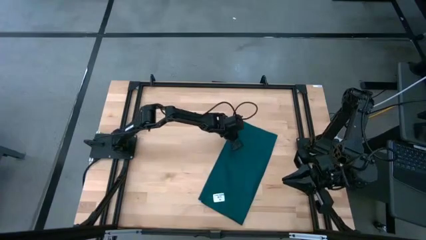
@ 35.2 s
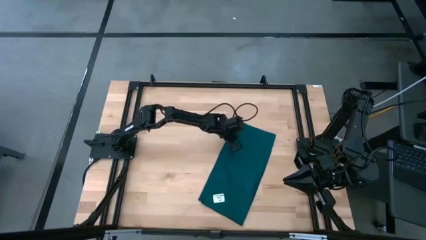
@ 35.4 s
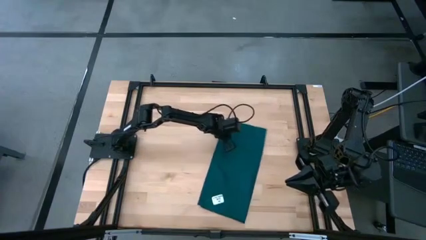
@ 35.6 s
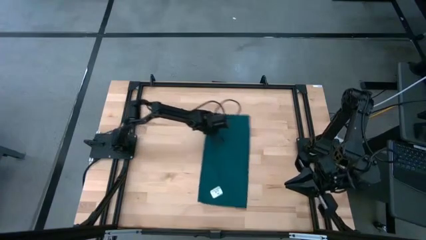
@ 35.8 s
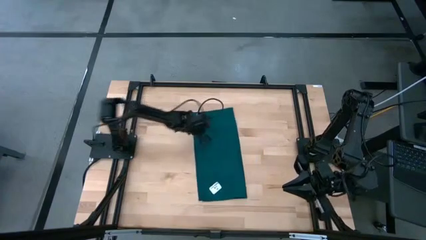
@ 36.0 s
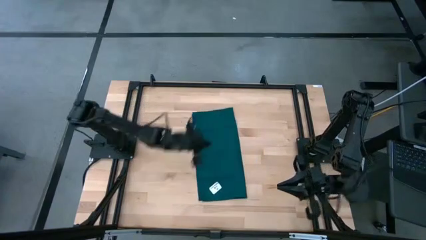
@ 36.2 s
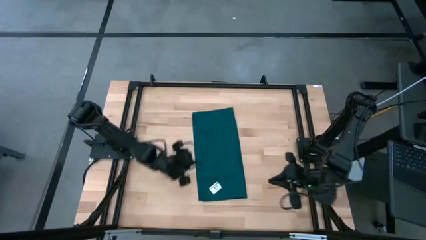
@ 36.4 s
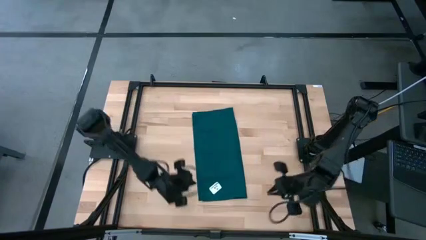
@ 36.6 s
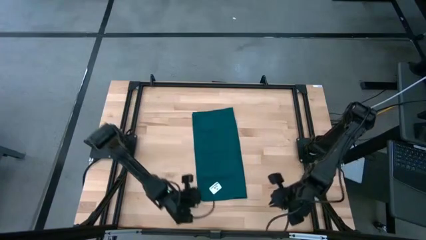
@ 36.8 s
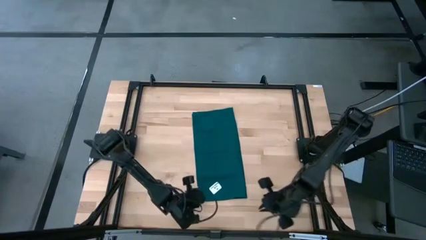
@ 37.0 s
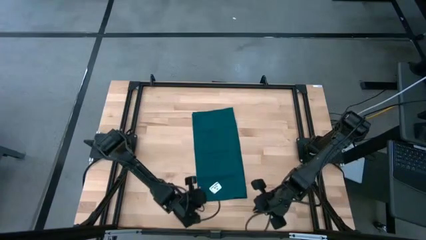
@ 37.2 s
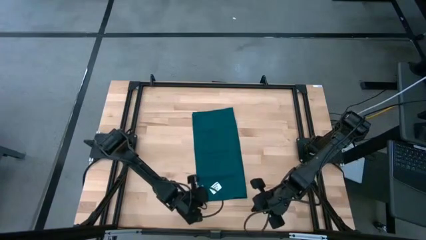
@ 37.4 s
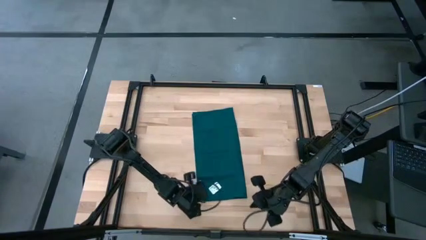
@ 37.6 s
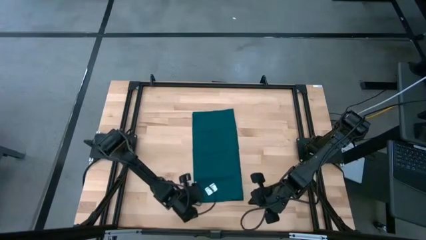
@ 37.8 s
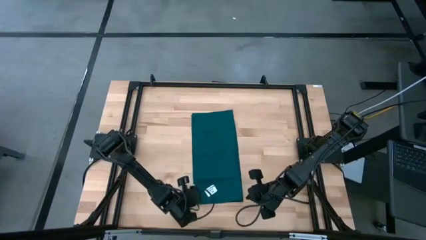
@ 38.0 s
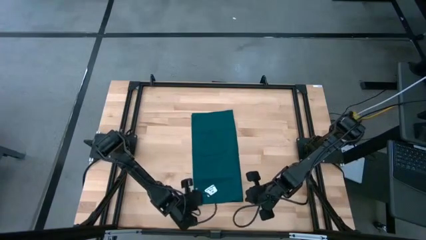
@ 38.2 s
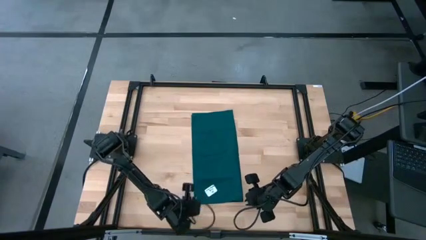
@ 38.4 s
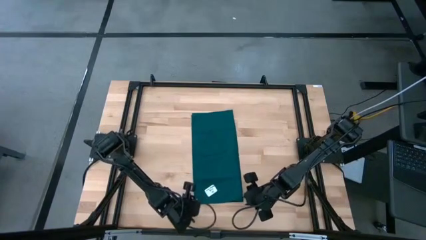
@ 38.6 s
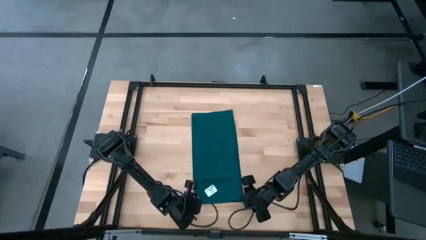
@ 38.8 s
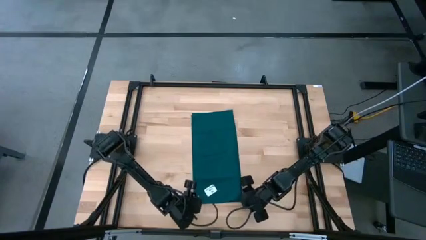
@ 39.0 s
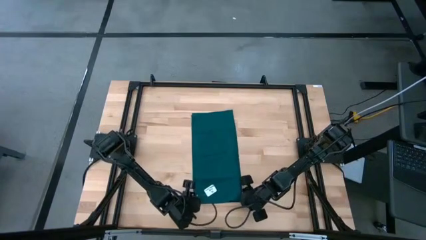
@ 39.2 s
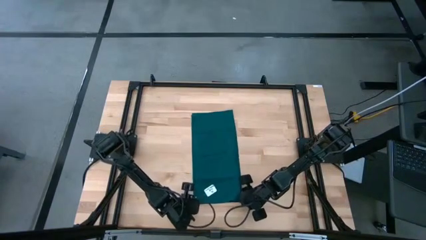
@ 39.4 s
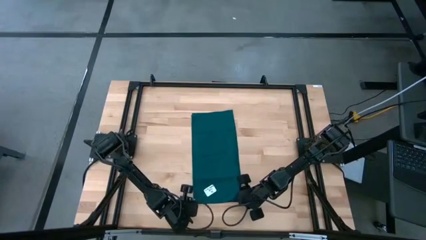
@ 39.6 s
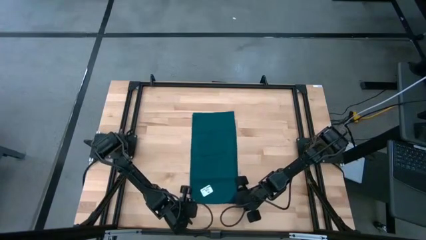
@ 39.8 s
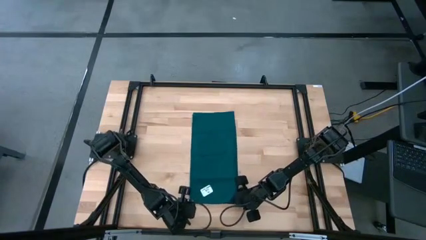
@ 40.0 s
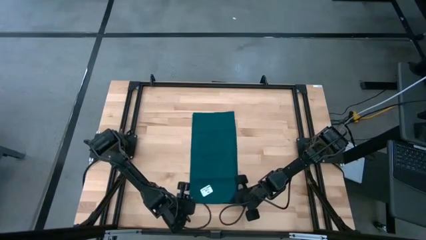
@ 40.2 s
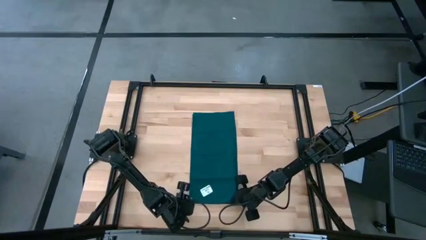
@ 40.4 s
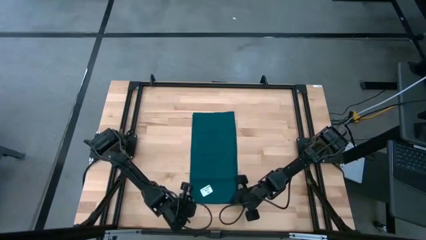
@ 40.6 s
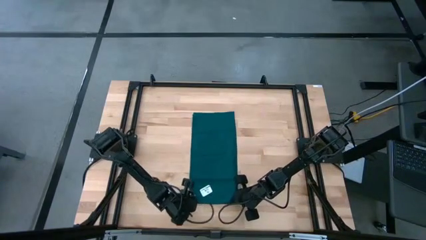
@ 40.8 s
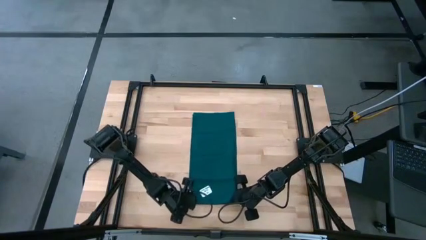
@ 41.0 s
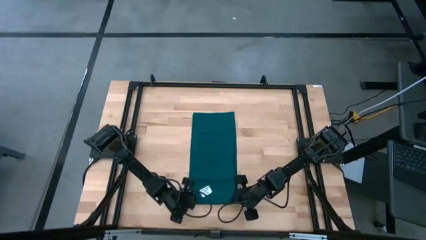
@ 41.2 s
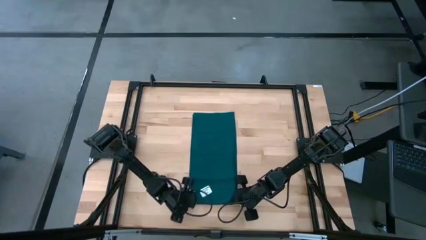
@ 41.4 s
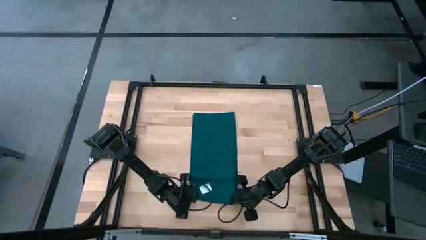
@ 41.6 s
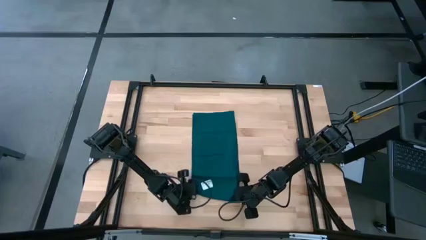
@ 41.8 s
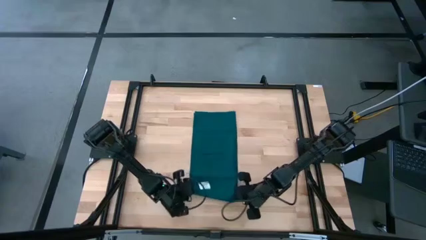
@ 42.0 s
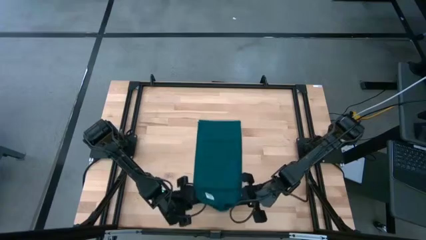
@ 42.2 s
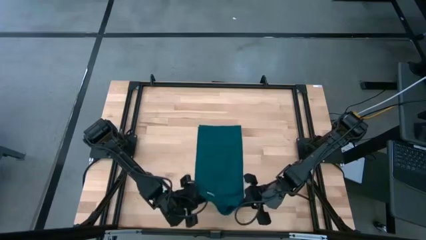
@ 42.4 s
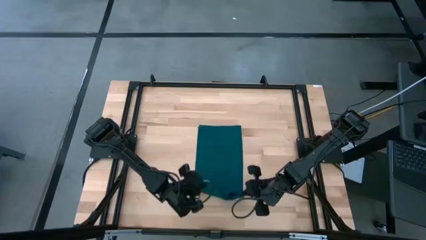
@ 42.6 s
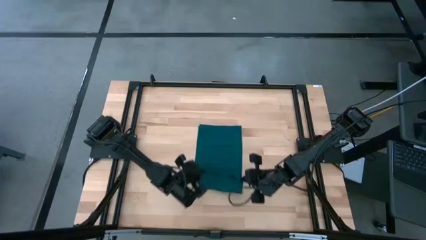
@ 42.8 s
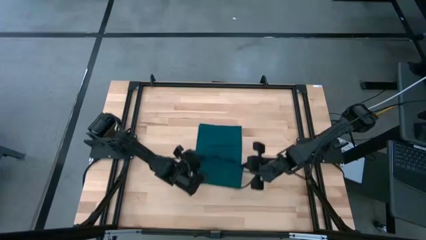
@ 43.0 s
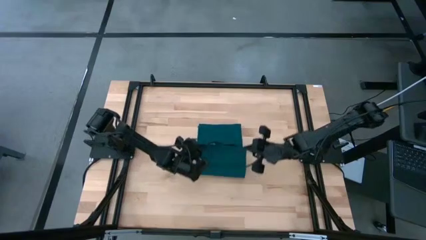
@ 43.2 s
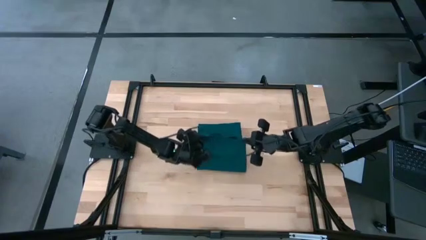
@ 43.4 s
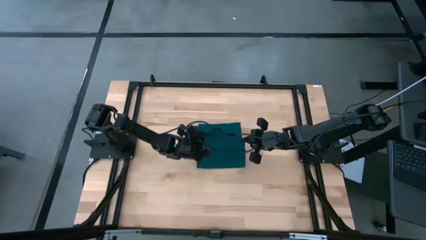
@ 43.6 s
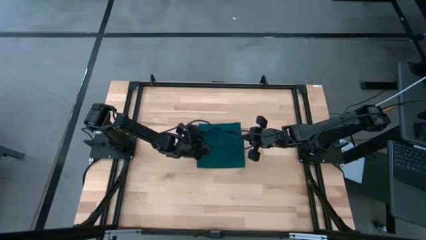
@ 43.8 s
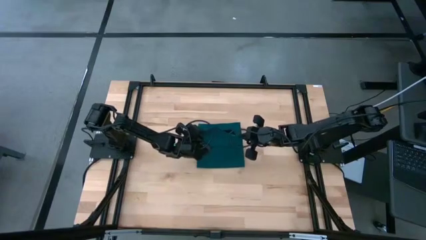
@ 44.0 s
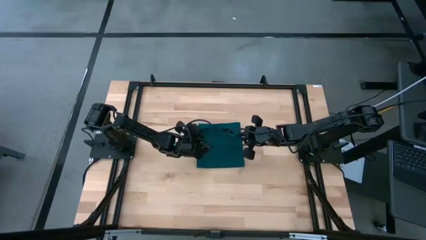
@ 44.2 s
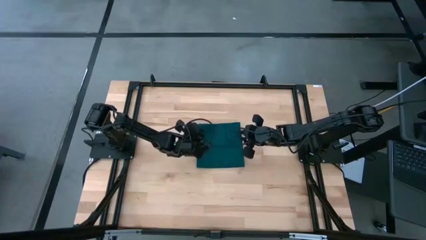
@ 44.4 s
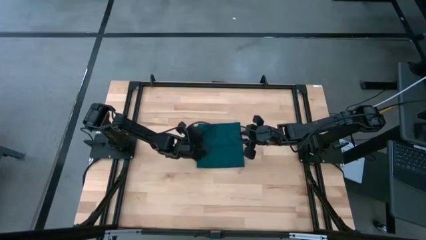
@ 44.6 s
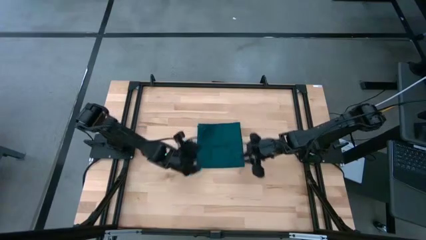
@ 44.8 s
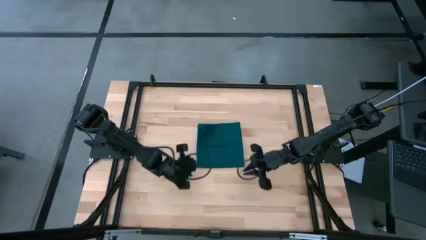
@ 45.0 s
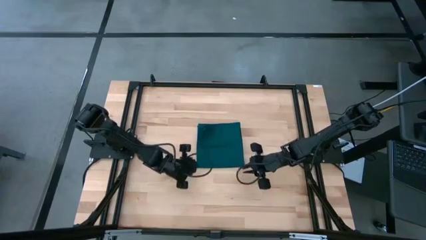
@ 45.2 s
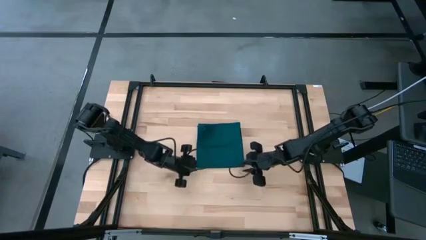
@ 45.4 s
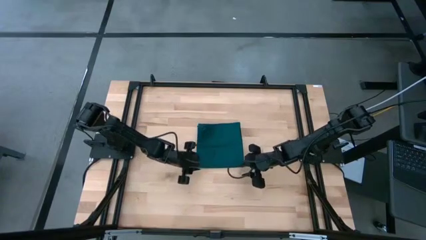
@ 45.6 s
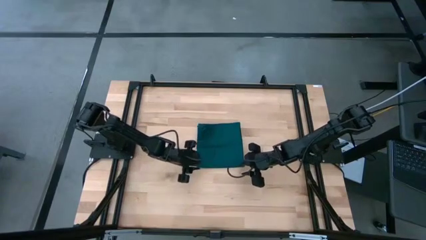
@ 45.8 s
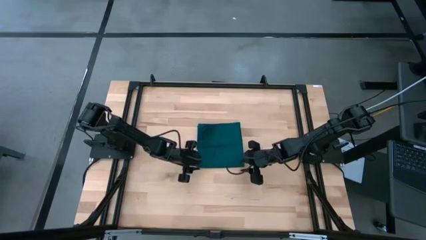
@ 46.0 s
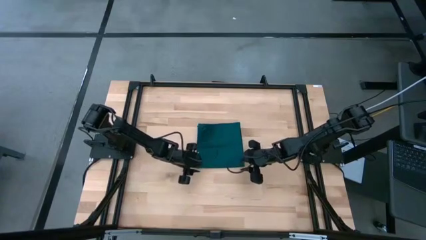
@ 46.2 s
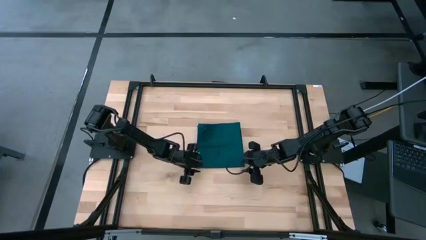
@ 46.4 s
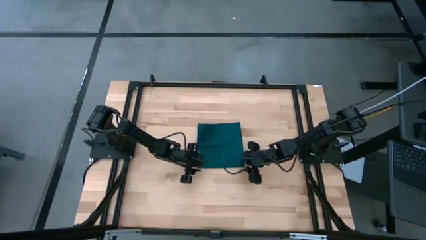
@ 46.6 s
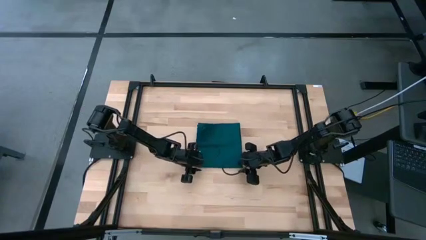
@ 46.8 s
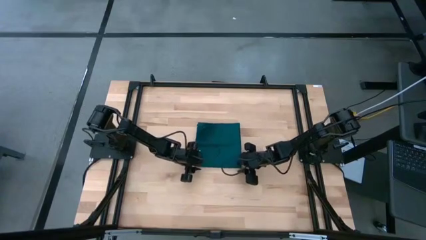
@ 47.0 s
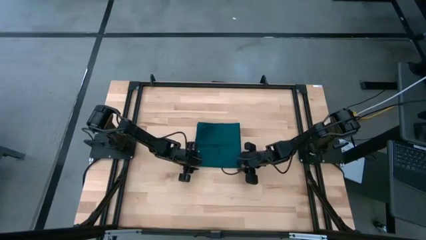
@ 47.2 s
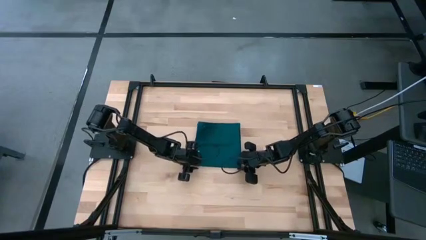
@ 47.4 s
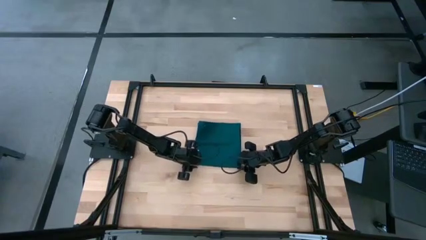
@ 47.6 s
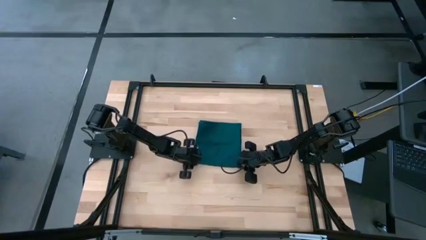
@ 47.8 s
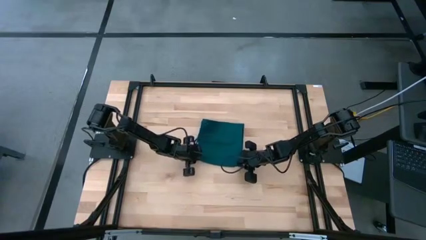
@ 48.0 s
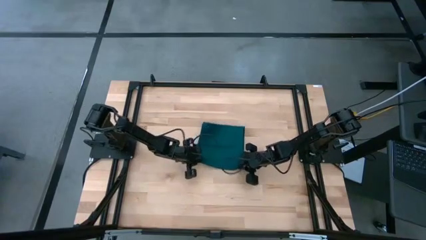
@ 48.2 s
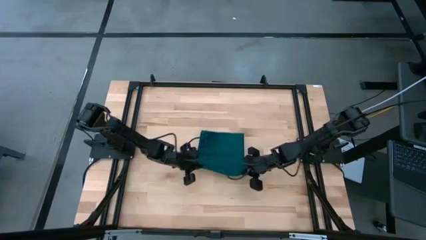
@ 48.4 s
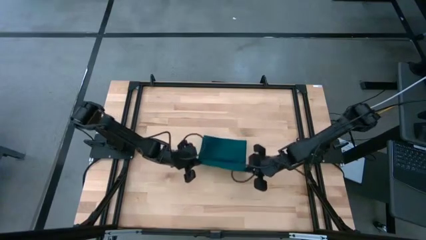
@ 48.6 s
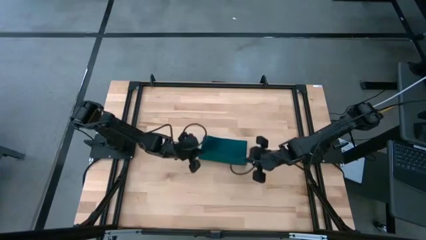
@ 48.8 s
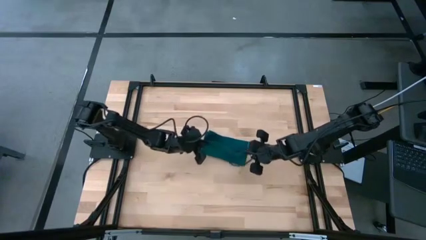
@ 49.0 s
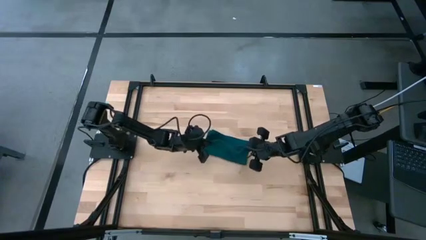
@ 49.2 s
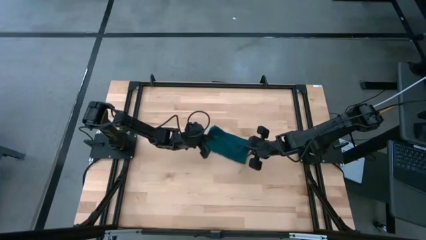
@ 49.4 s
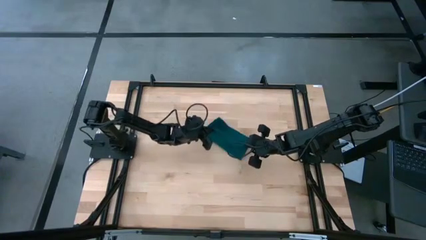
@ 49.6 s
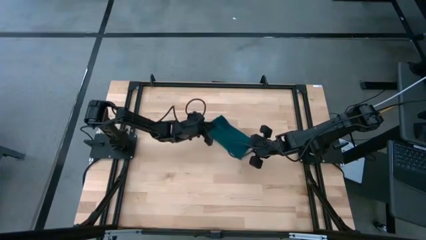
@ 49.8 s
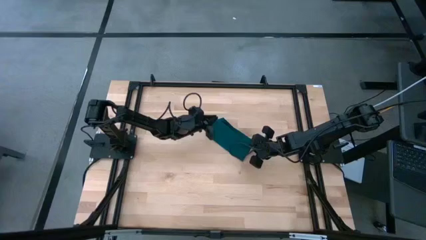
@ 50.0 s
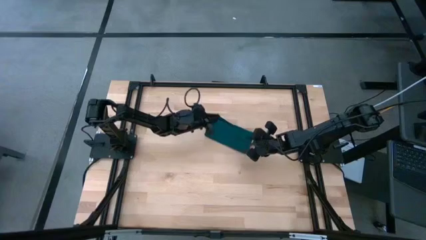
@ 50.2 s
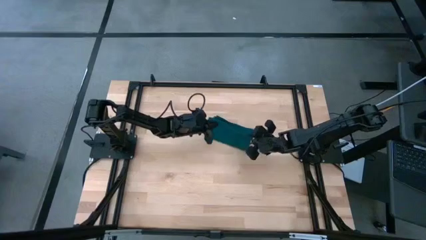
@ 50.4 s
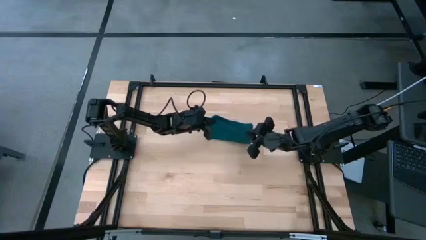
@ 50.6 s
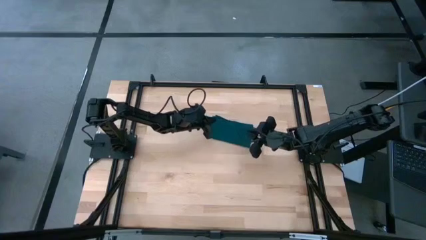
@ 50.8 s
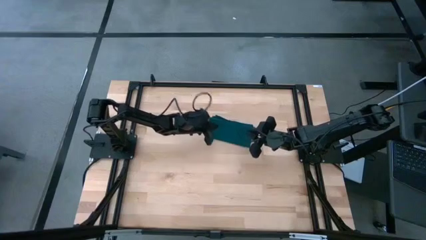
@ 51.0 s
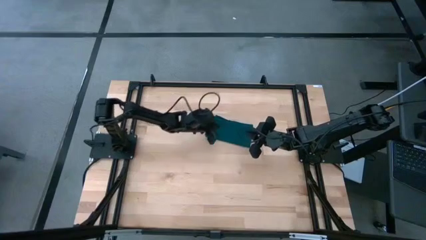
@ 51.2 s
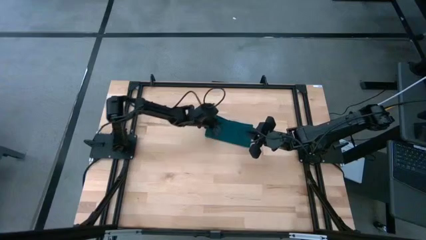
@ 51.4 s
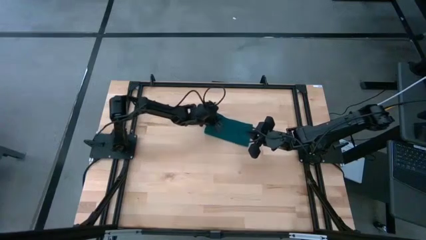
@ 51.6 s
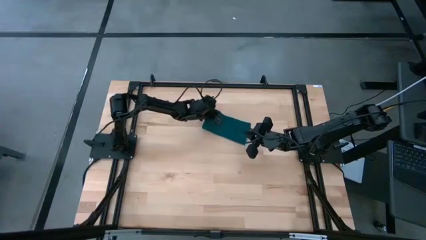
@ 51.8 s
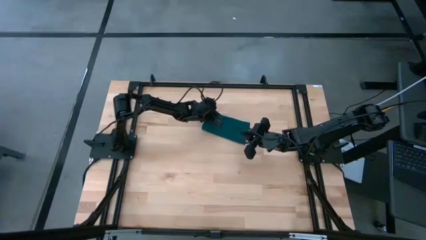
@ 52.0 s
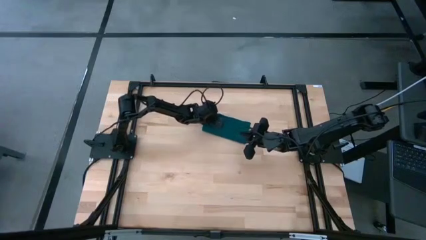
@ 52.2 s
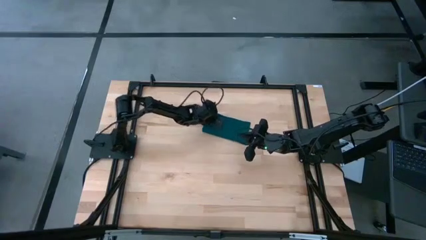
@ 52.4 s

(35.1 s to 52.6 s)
Task: Fold microfiber towels
Fold the towel
